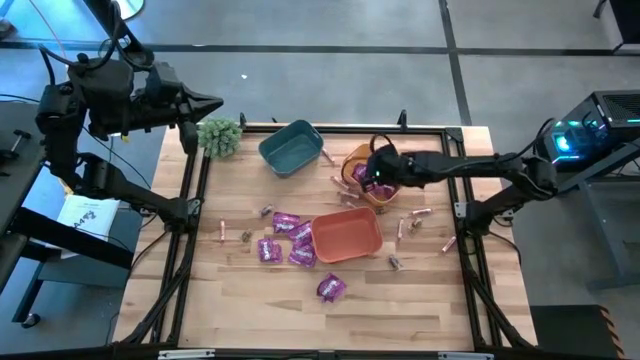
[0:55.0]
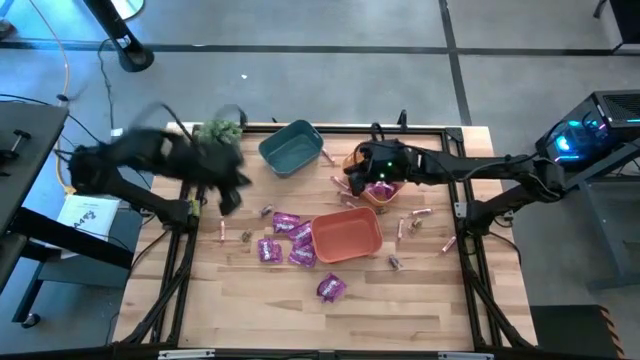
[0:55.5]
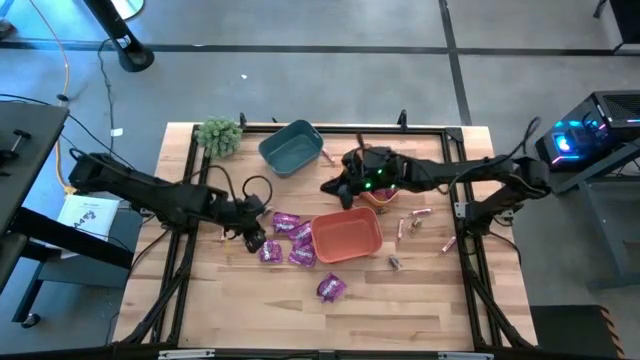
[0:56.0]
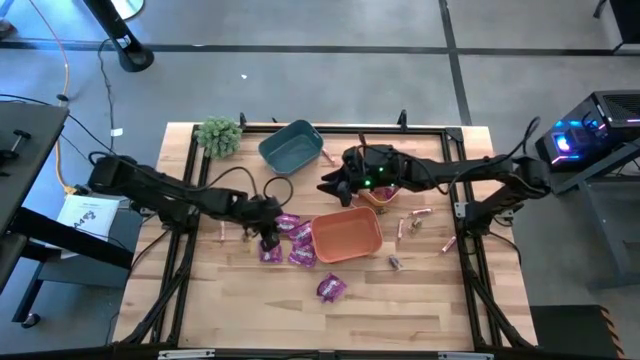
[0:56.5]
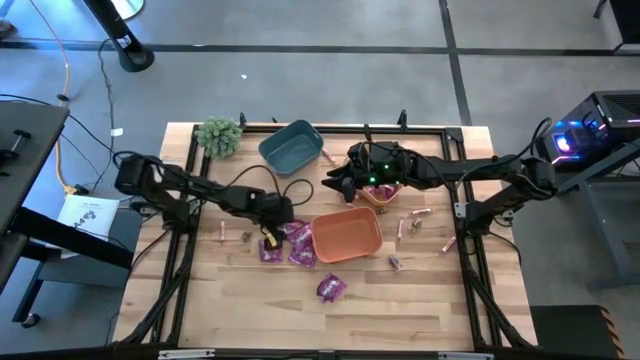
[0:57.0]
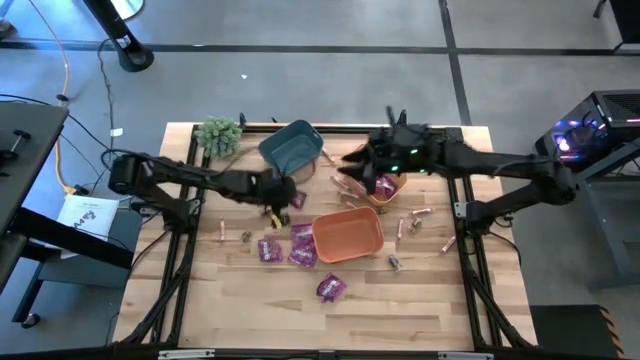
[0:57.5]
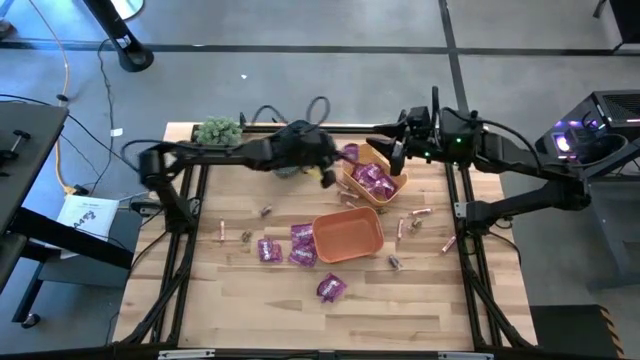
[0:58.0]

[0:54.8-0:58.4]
Task: Sort candy
Put the purple candy into the yellow bin

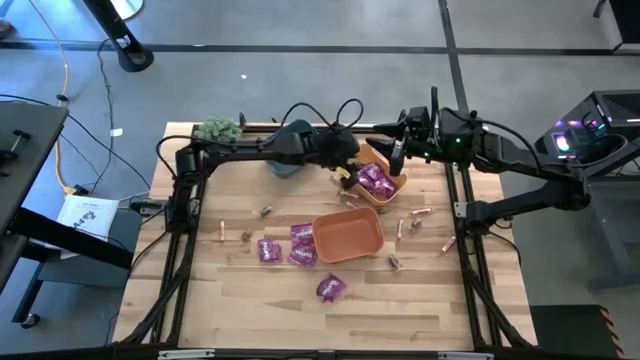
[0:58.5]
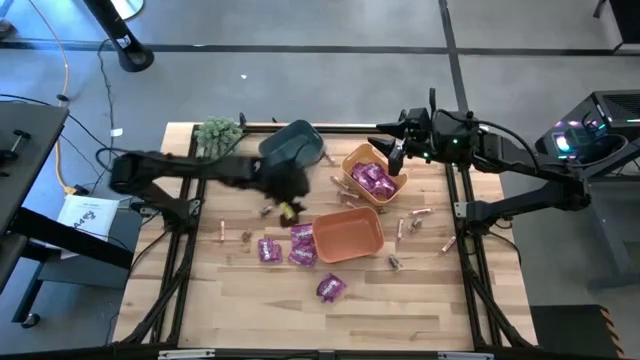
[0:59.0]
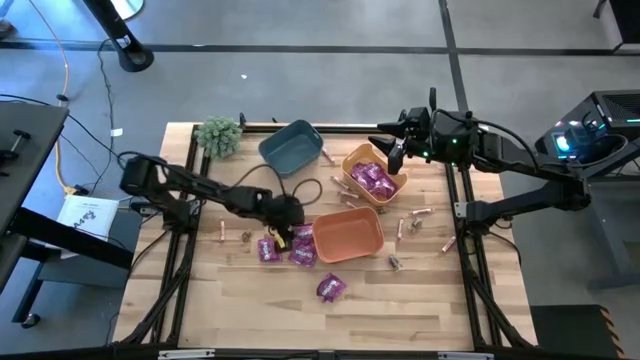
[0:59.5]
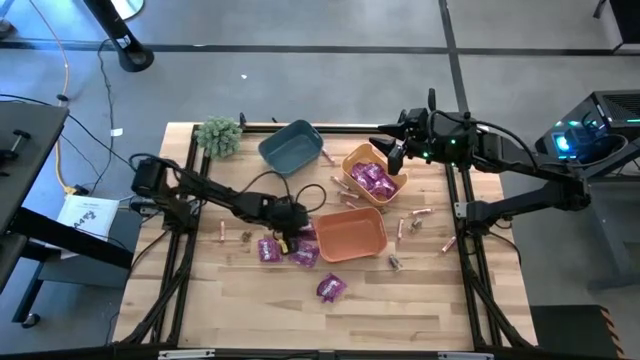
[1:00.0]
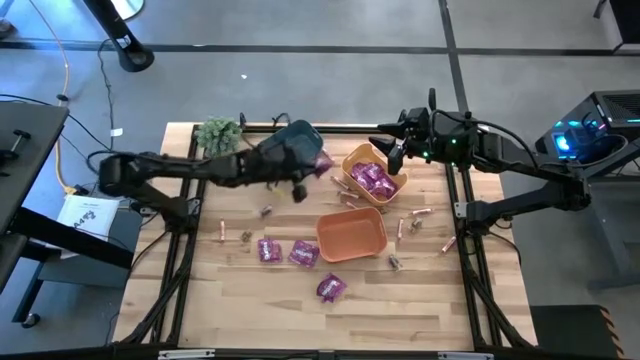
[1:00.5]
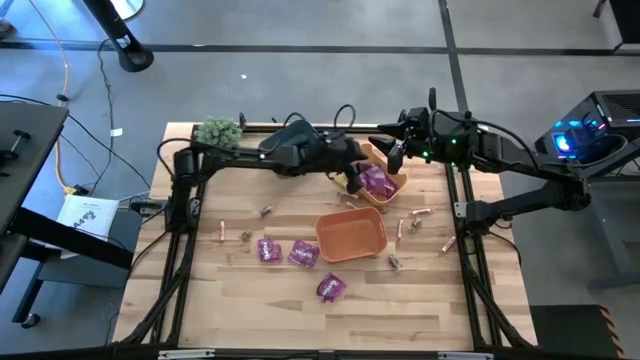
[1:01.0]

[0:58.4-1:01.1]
Put the purple candy into the yellow bin

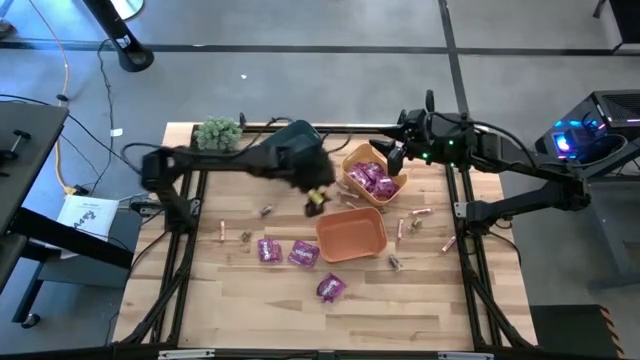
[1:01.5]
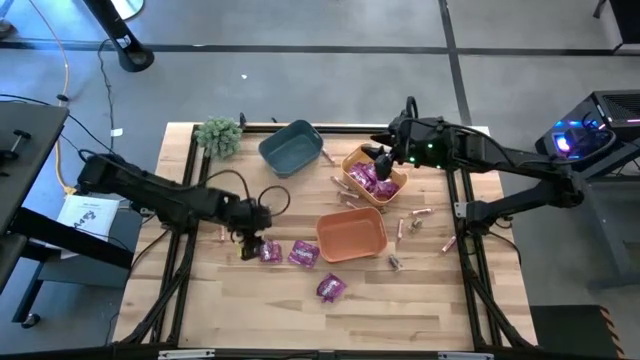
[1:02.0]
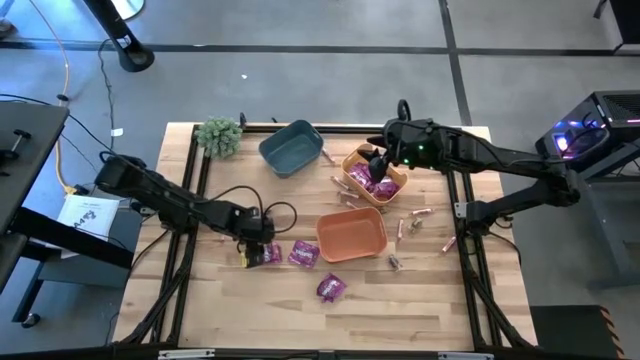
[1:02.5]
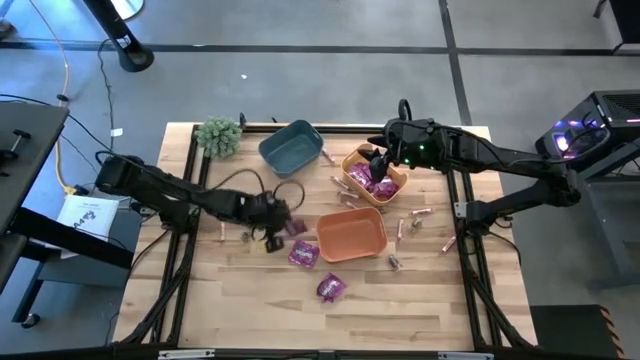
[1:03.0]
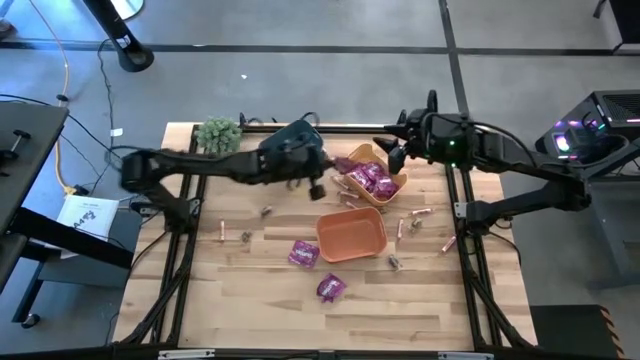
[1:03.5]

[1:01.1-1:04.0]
Put the top left purple candy into the yellow bin

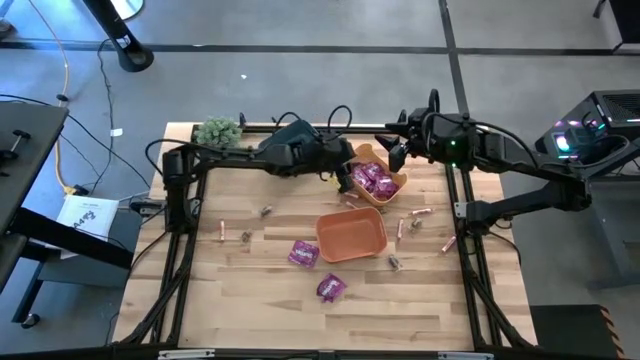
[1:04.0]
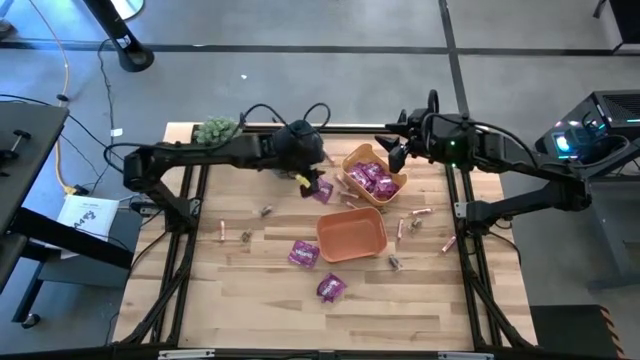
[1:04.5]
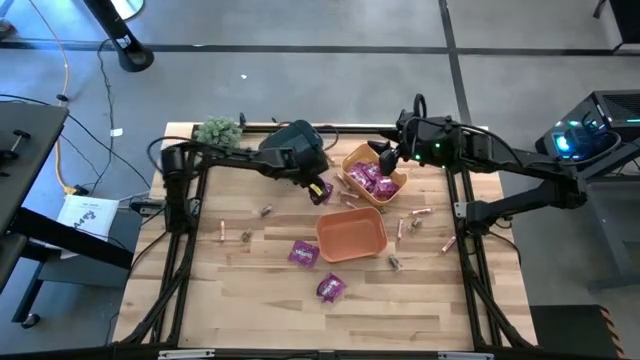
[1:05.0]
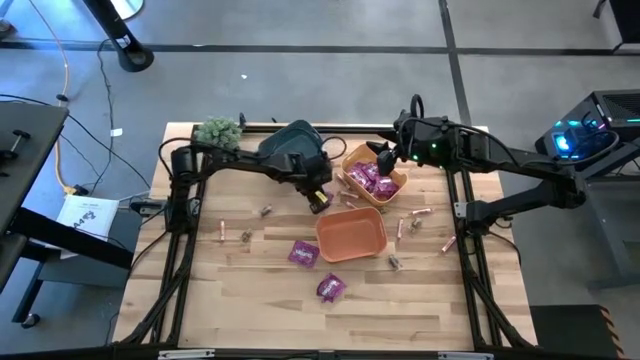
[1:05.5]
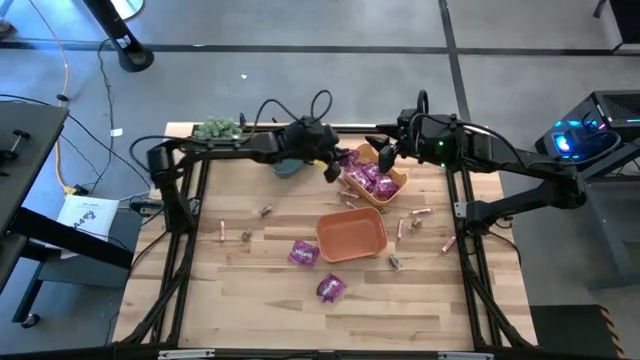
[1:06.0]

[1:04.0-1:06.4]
Put the top left purple candy into the yellow bin

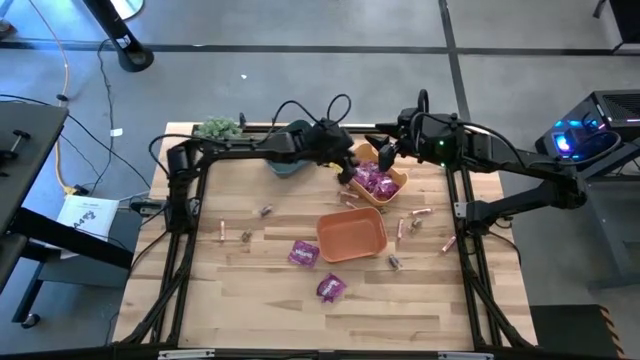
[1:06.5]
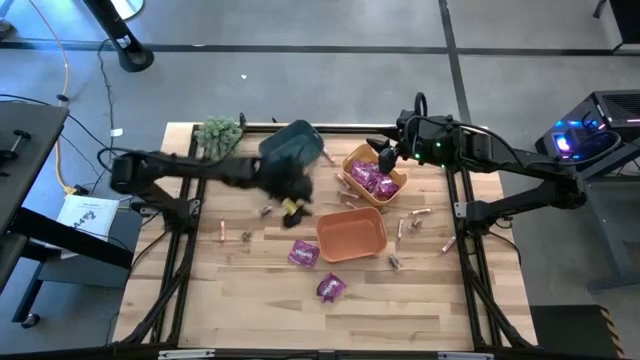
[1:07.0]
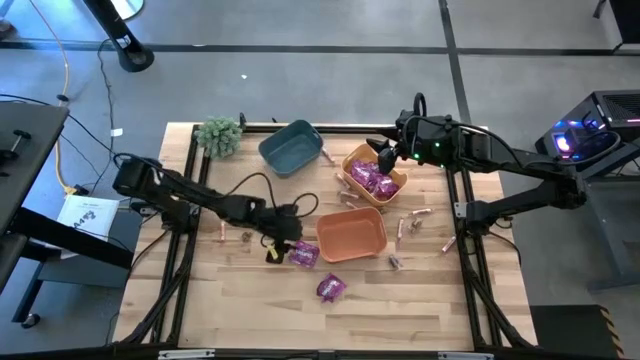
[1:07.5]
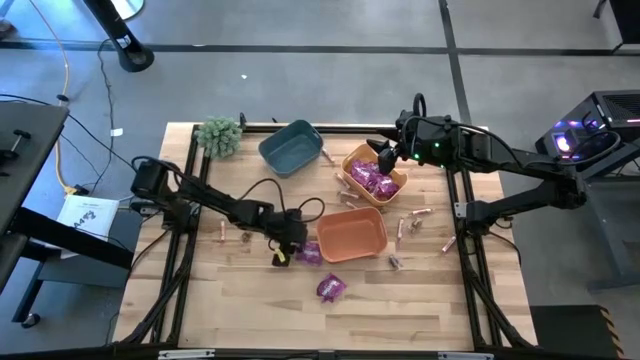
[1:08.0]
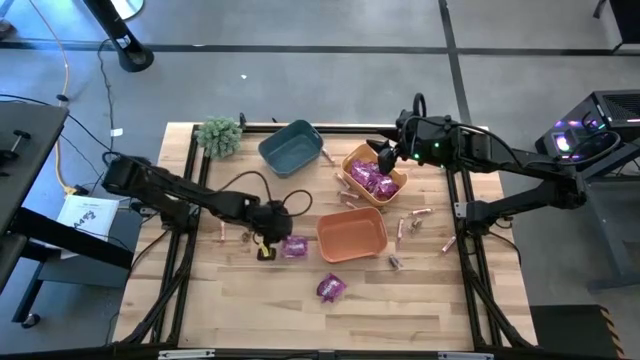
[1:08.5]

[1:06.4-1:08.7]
Put the top purple candy into the yellow bin

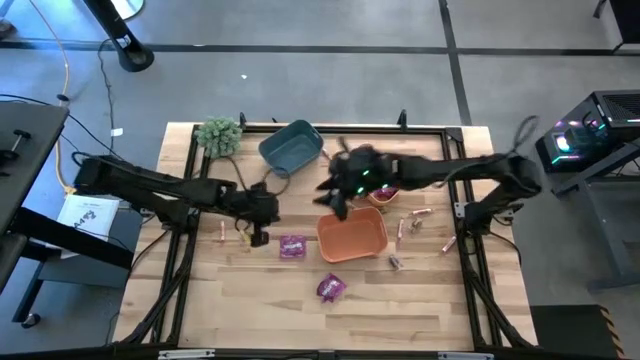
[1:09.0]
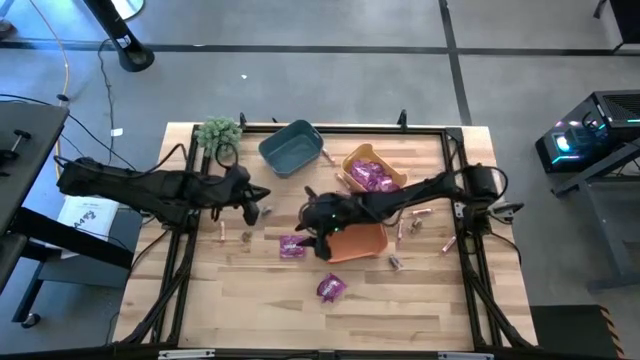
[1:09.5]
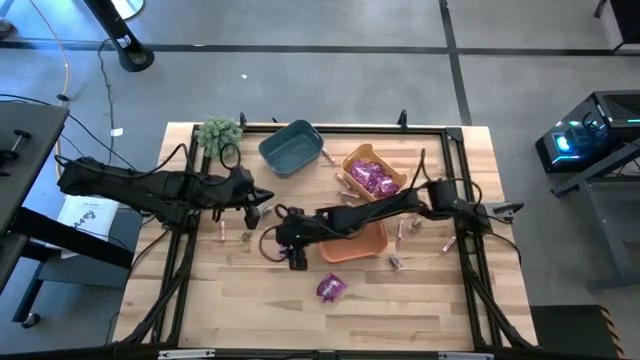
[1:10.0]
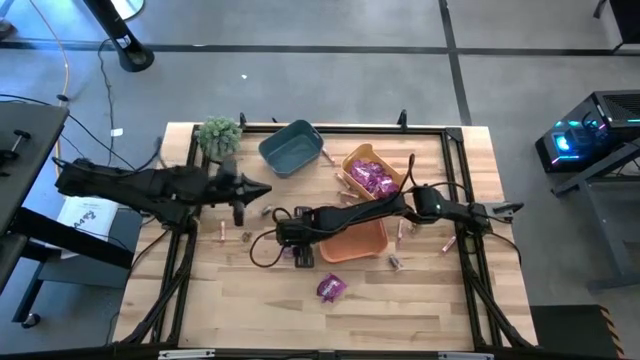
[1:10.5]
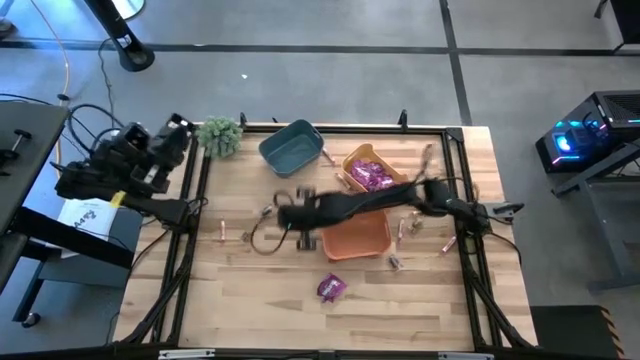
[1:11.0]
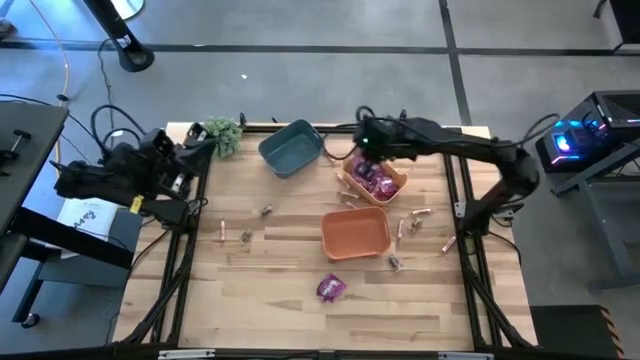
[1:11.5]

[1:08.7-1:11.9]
Put the top purple candy into the yellow bin

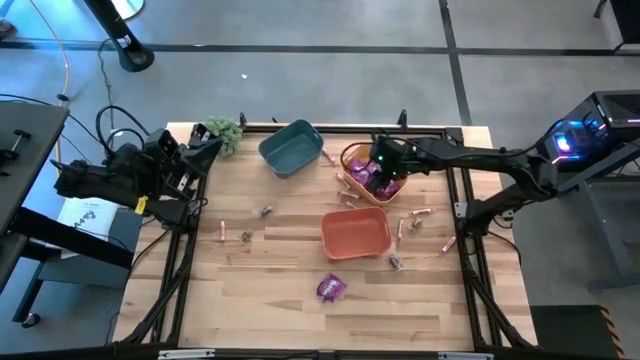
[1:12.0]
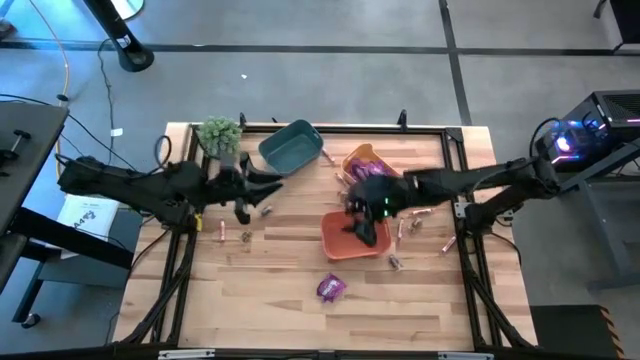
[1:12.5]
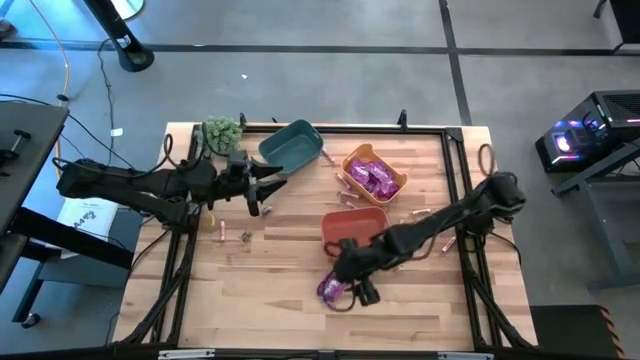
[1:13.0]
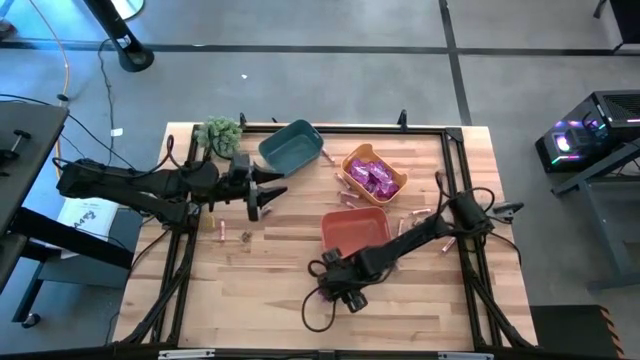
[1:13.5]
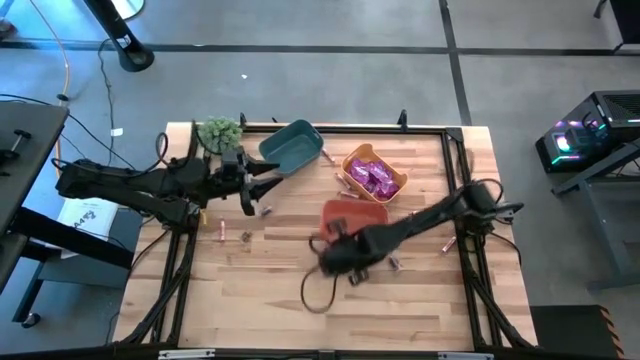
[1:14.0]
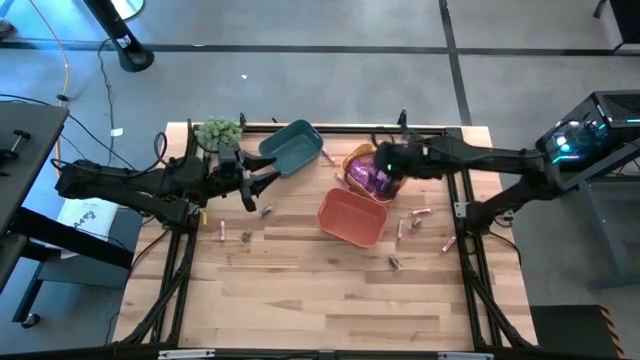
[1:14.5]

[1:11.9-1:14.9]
Put the purple candy into the yellow bin

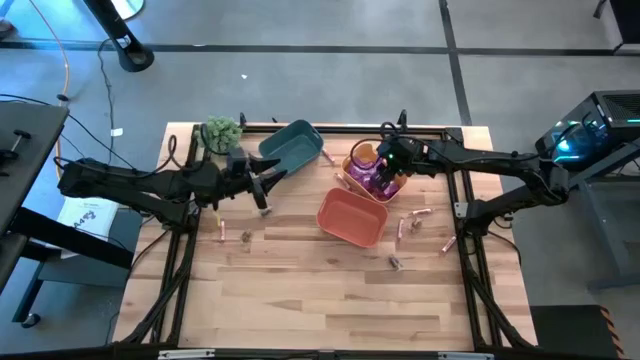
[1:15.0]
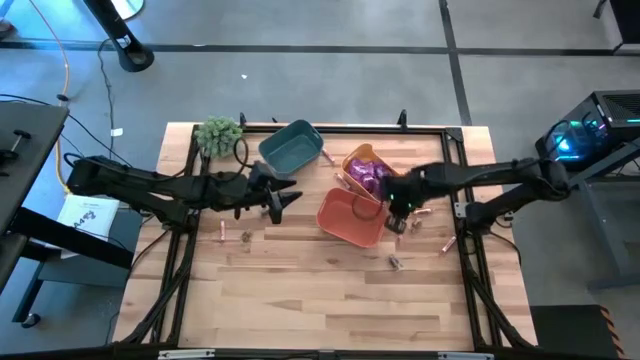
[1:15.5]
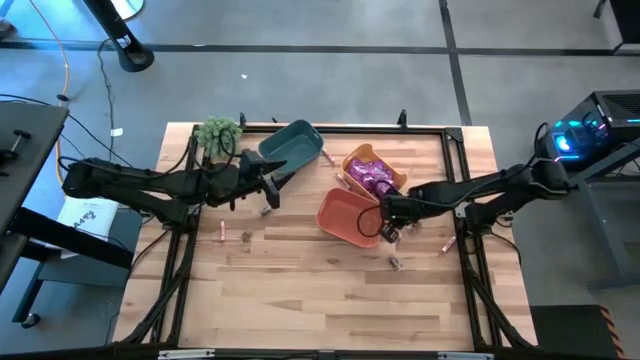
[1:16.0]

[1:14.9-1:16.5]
Adjust the orange bin on the table
